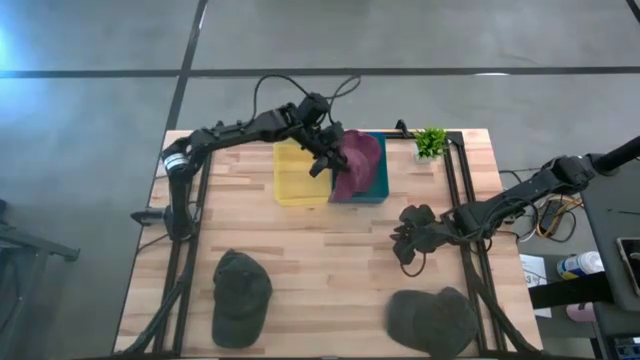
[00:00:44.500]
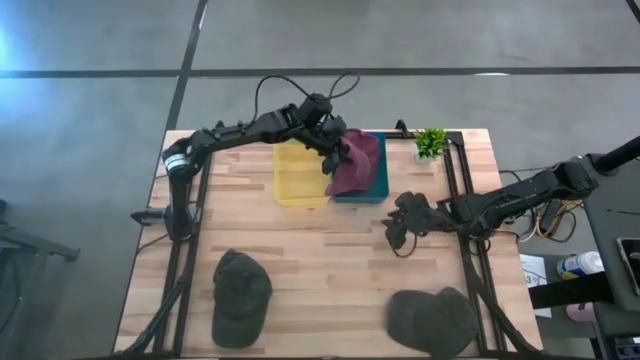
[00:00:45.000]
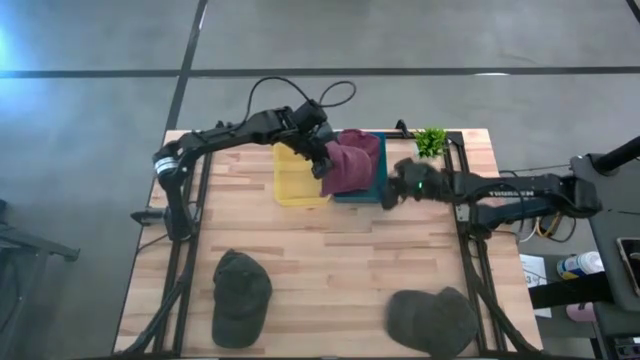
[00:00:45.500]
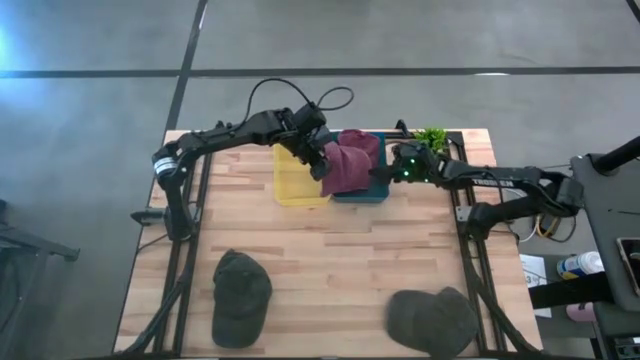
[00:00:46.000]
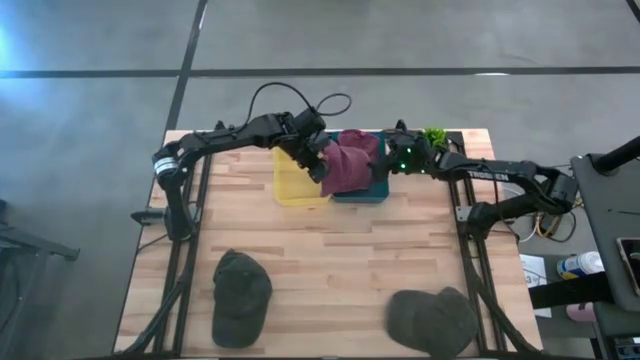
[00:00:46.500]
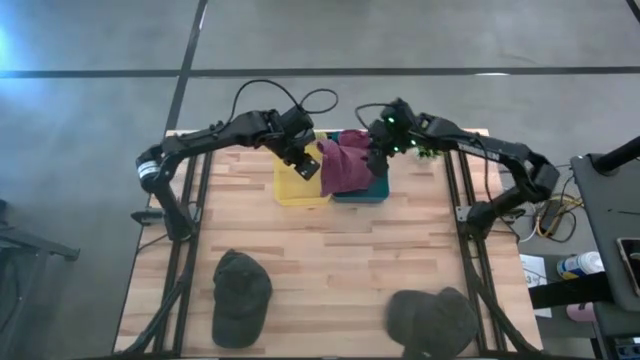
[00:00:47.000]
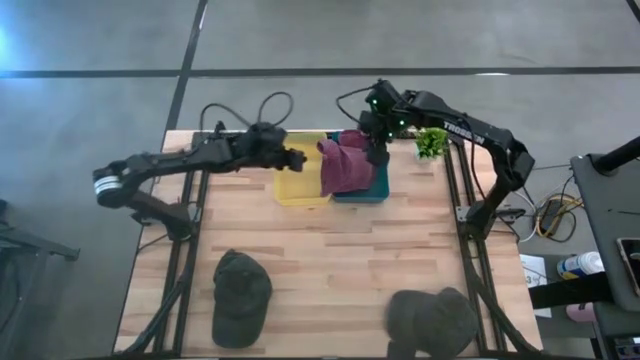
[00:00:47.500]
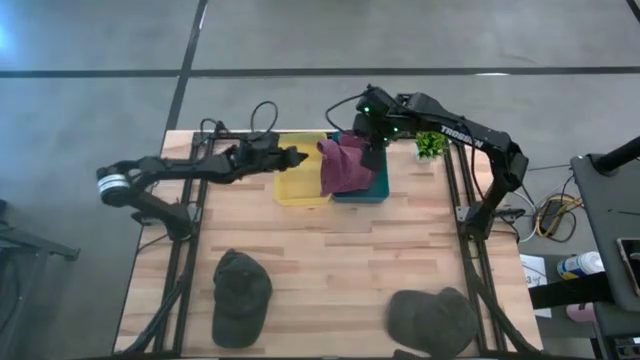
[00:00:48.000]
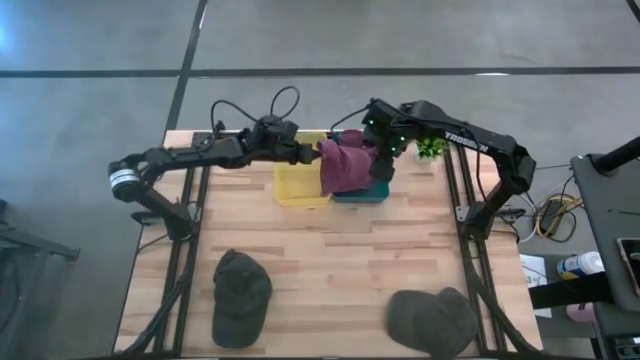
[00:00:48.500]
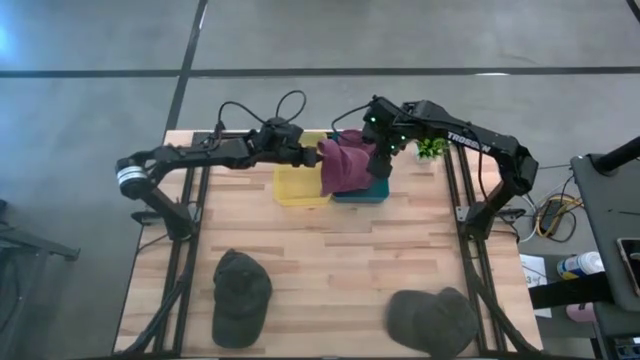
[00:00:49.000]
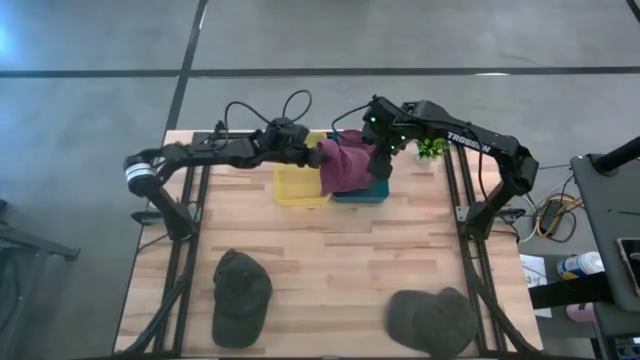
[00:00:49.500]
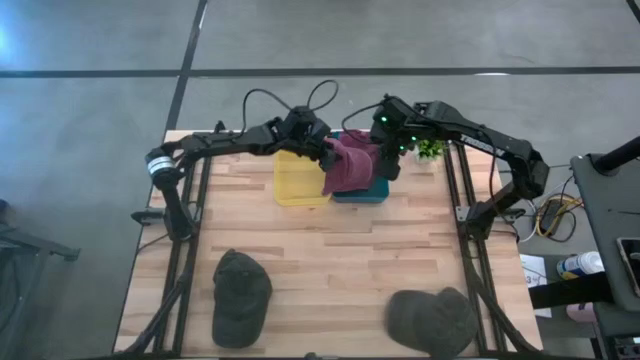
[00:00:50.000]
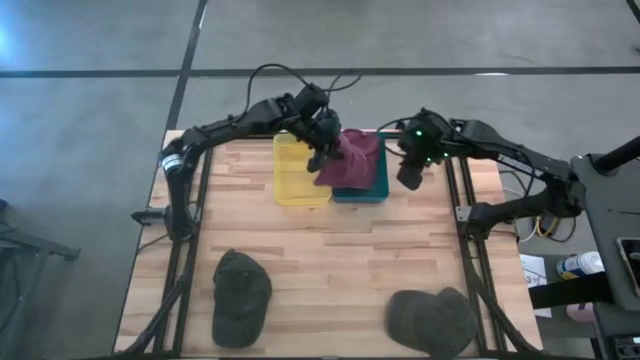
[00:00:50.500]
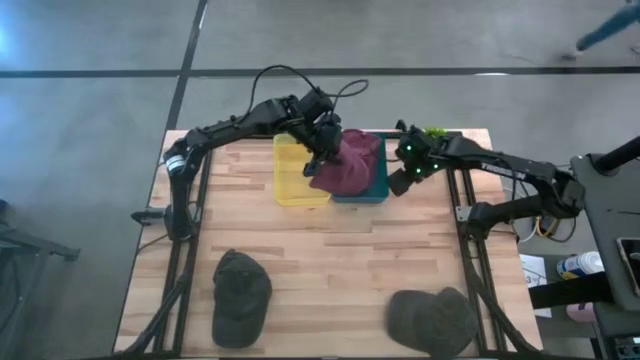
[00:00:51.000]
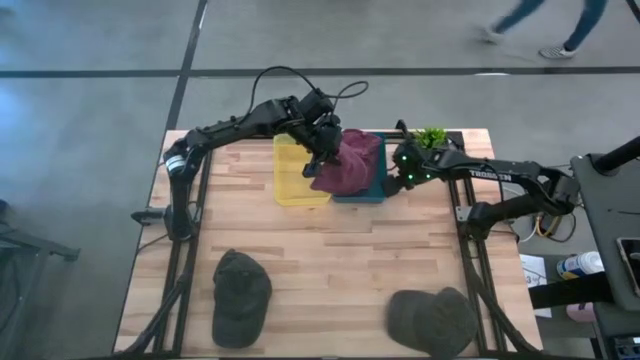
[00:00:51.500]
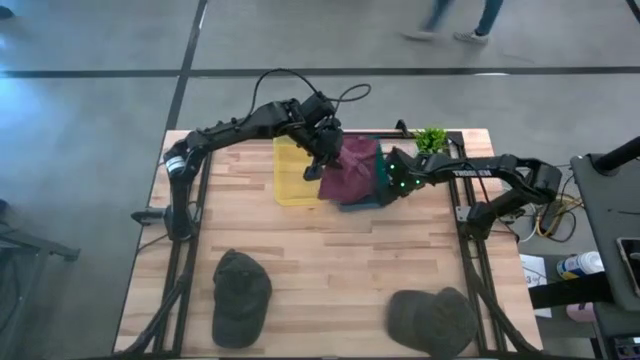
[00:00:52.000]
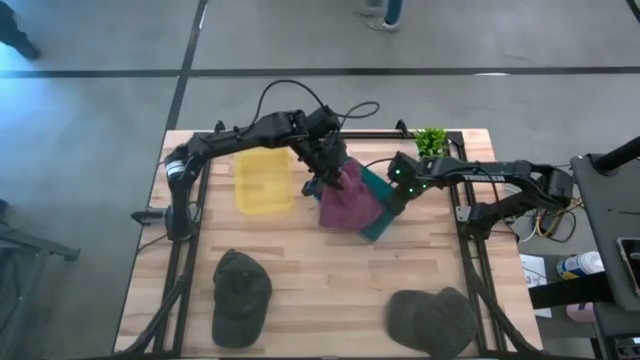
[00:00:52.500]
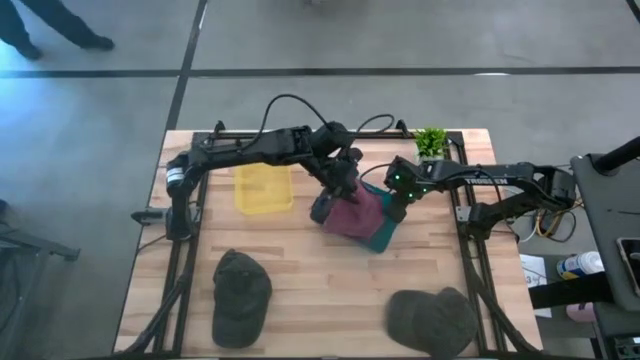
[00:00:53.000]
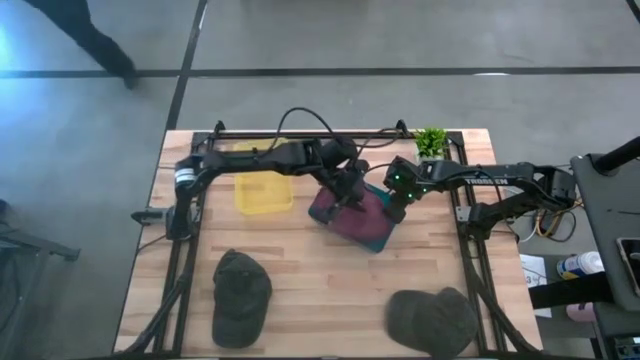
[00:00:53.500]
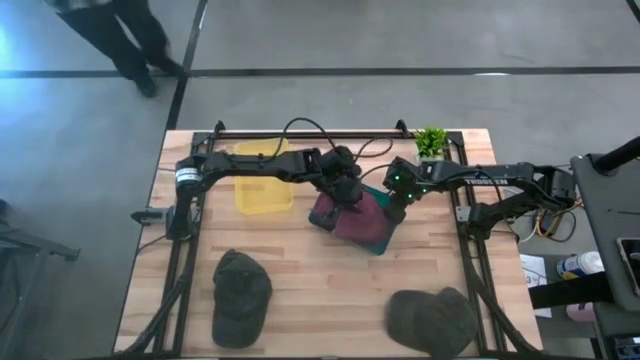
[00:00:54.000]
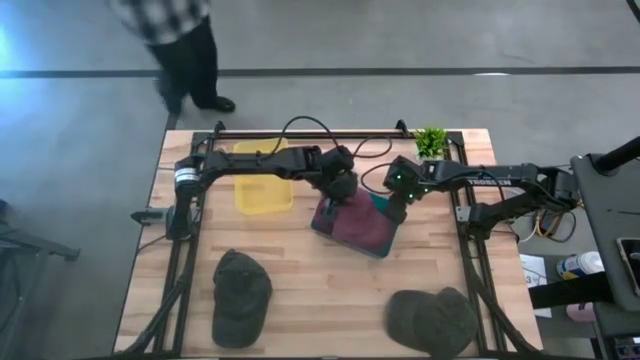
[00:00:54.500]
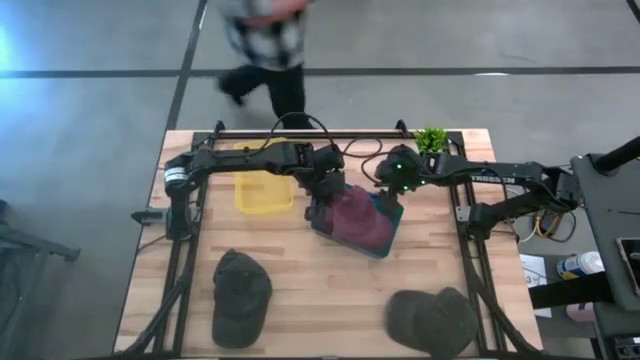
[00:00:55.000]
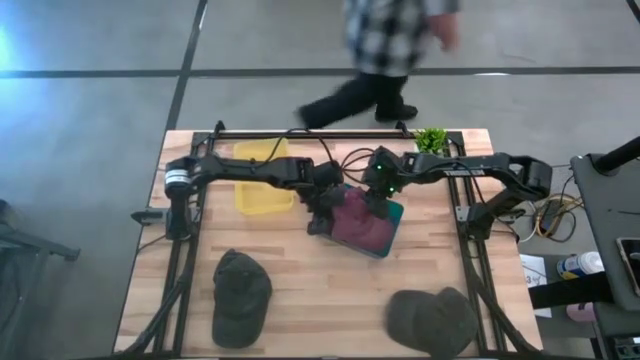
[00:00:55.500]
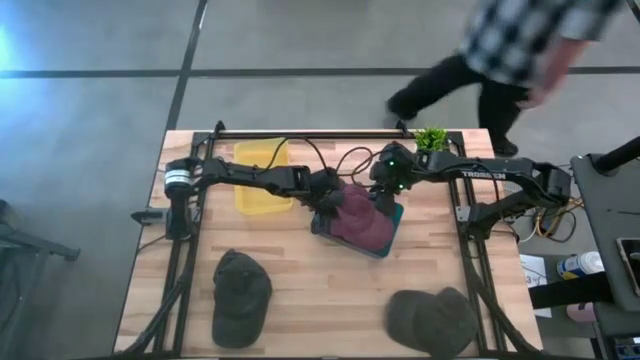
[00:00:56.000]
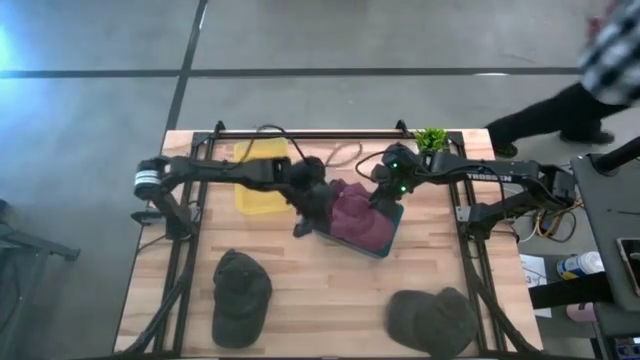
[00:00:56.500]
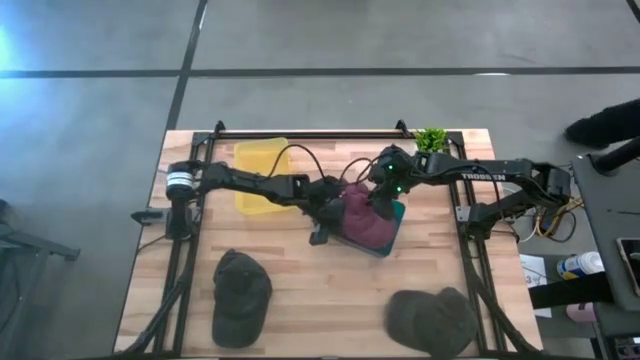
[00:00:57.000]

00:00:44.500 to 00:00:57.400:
Task: Sort caps
Put the red cap into the blue bin

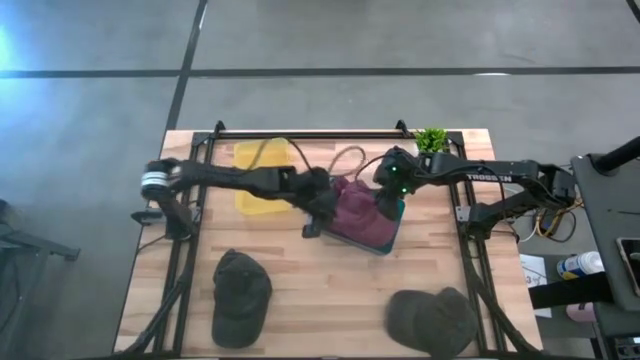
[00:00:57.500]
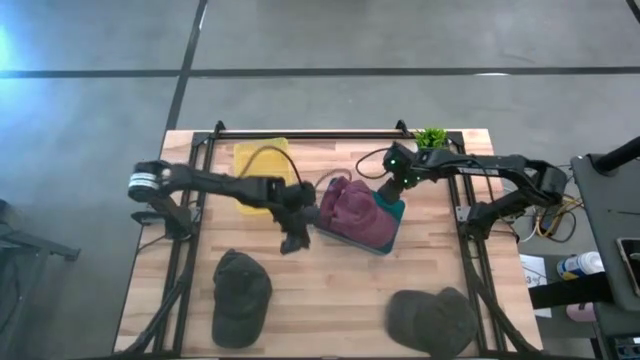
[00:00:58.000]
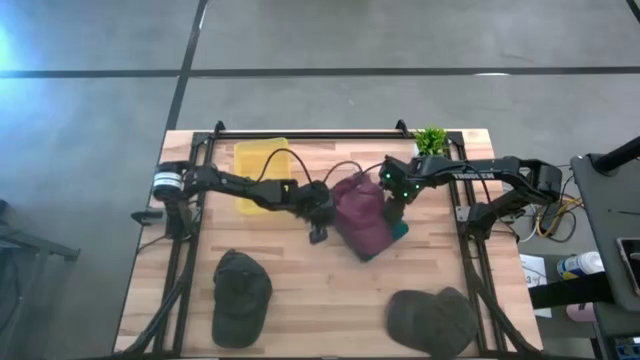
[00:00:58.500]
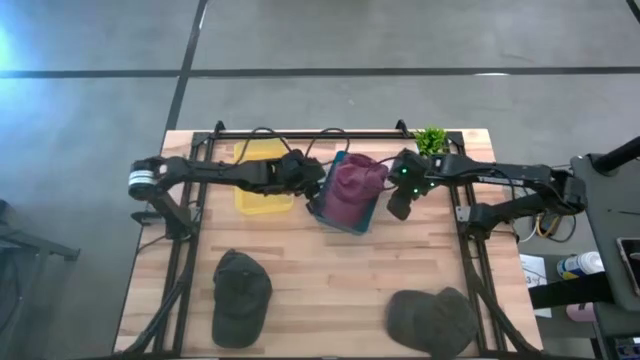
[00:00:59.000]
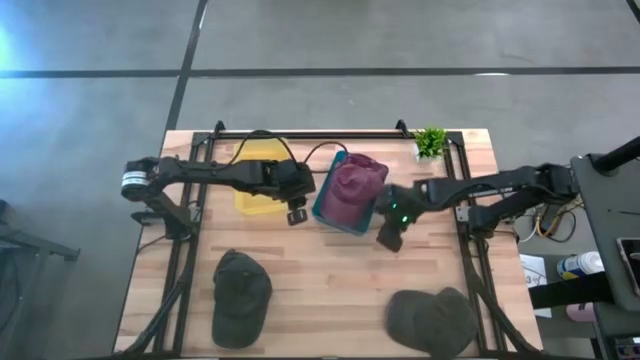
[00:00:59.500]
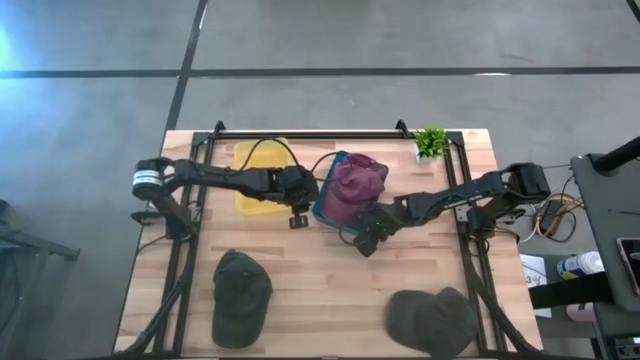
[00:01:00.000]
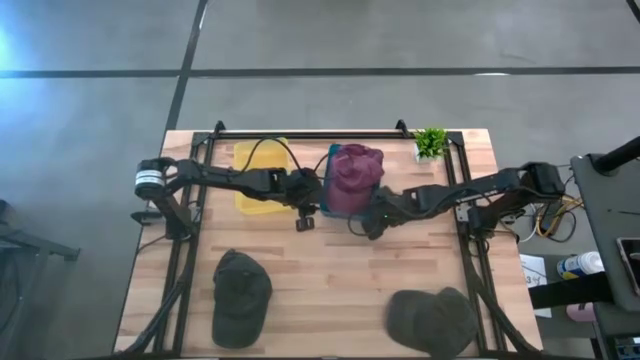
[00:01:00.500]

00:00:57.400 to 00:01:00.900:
Adjust the blue bin

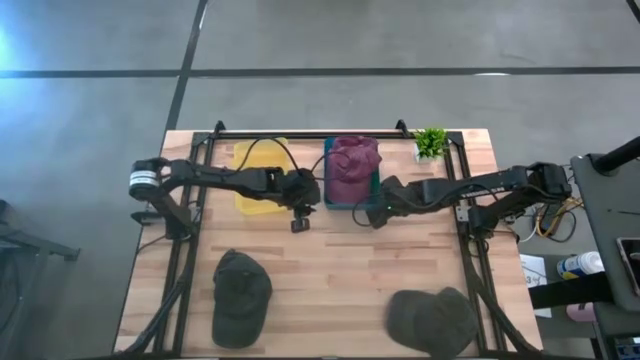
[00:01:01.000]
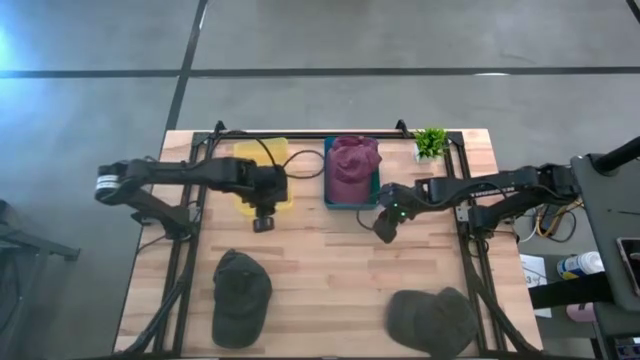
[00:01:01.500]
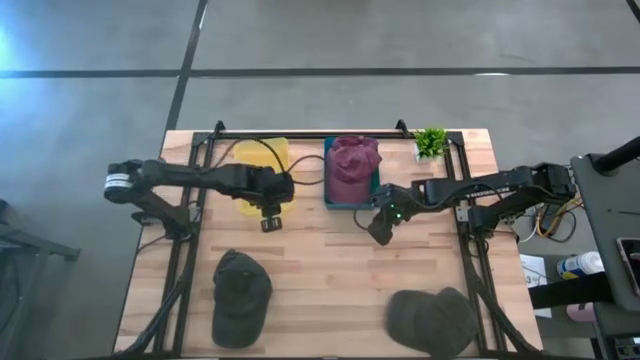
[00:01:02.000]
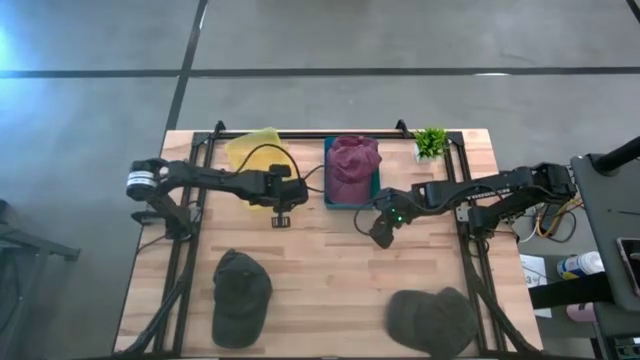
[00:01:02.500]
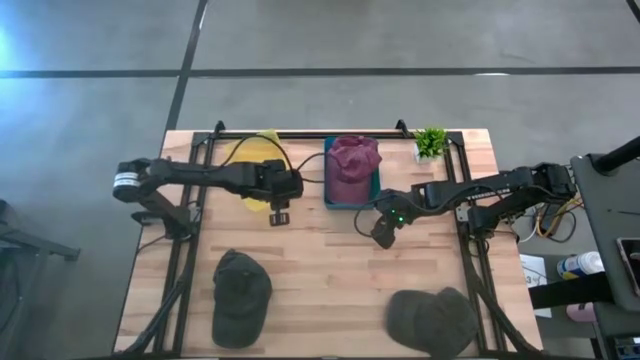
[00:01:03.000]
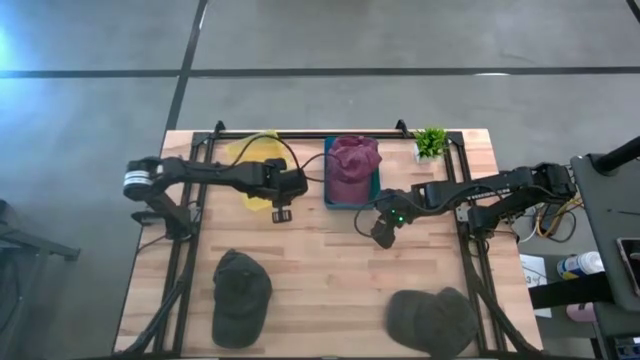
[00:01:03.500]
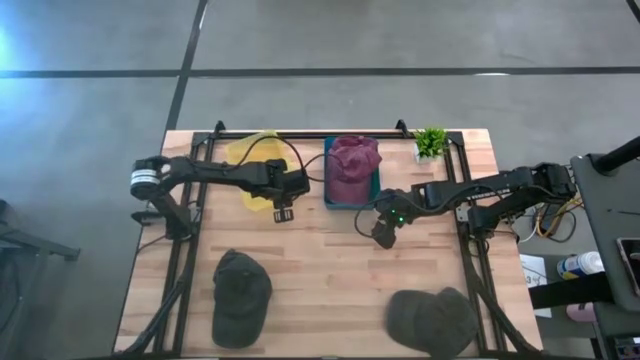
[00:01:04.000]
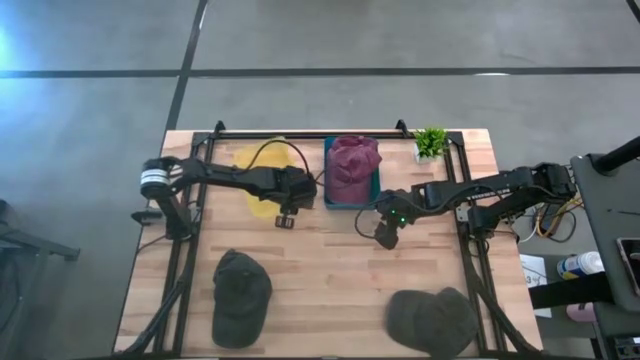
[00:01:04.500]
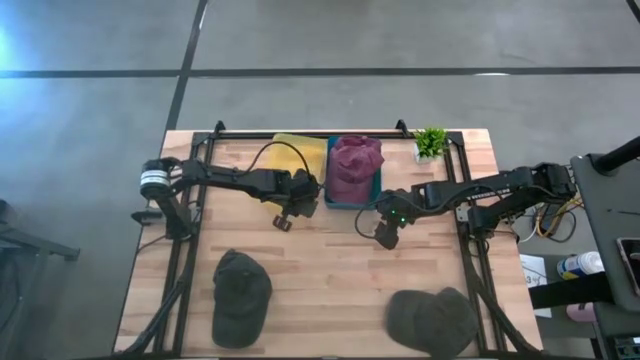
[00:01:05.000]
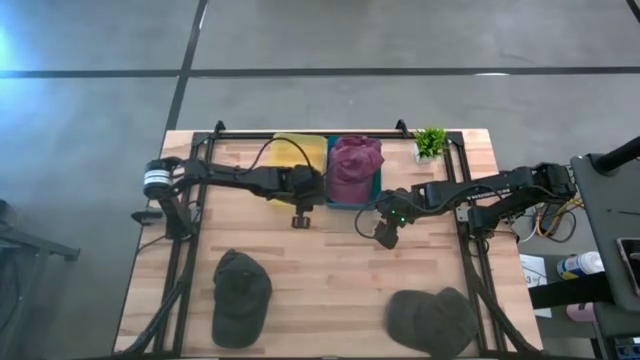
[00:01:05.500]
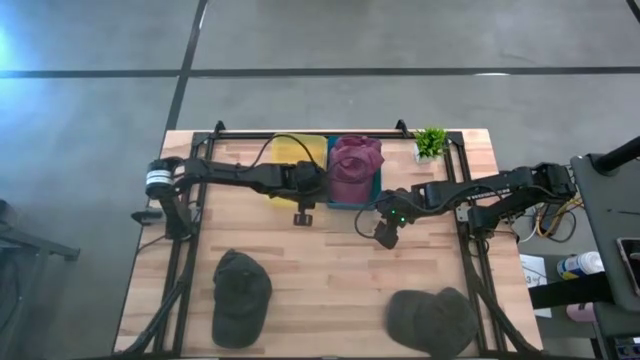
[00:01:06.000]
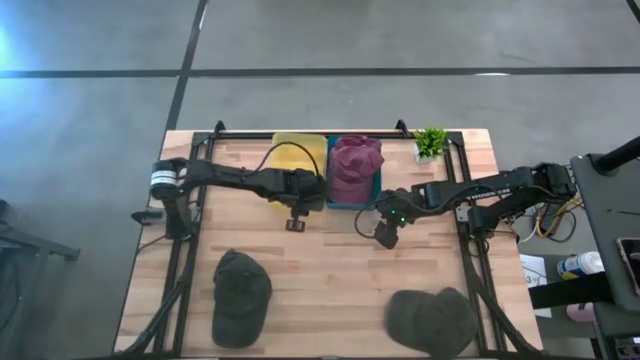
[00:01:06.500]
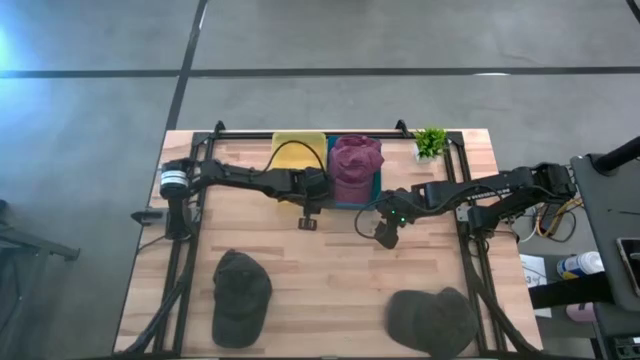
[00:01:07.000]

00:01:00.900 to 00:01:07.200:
Adjust the yellow bin
